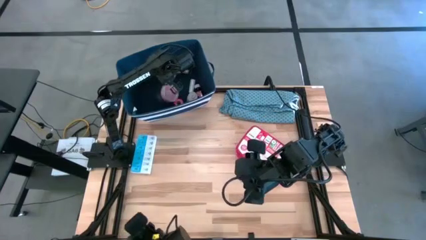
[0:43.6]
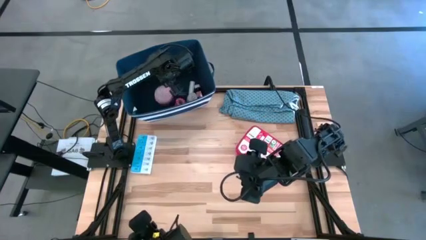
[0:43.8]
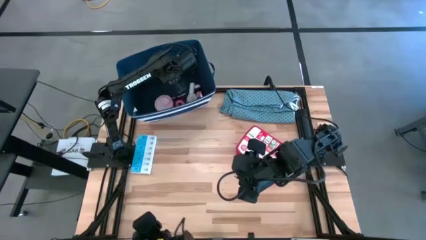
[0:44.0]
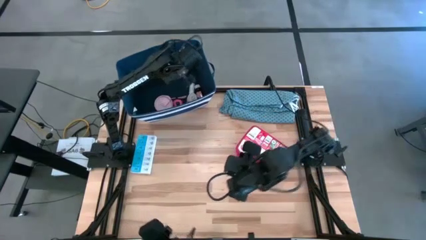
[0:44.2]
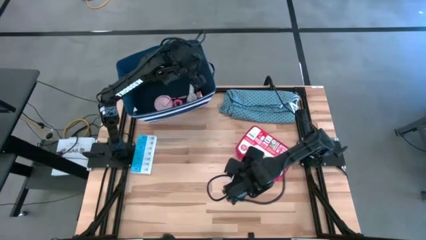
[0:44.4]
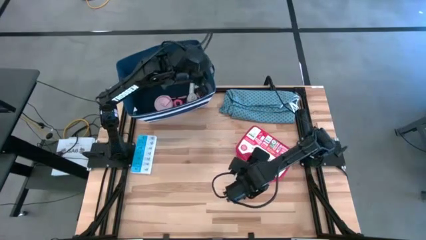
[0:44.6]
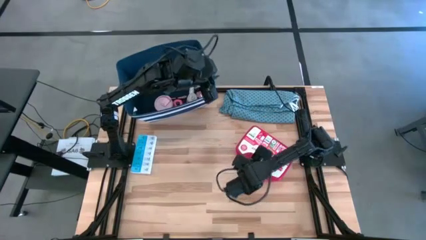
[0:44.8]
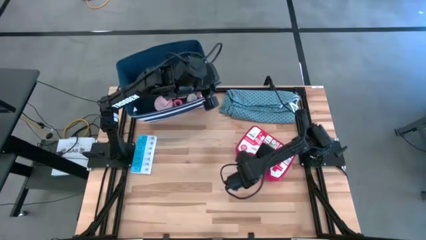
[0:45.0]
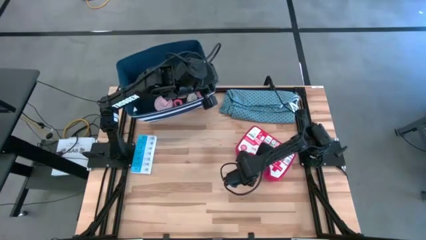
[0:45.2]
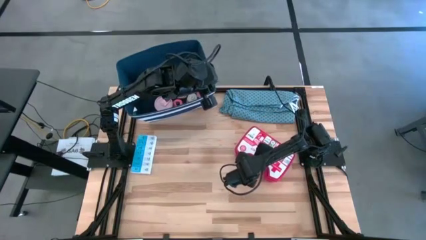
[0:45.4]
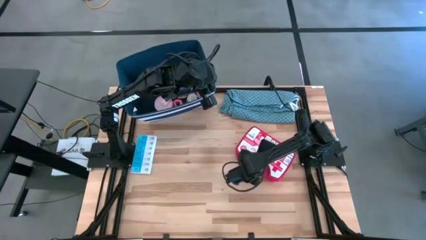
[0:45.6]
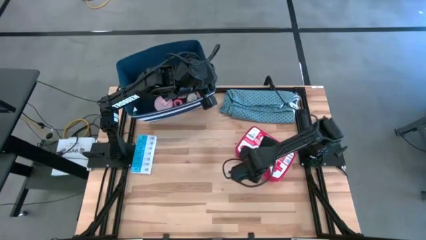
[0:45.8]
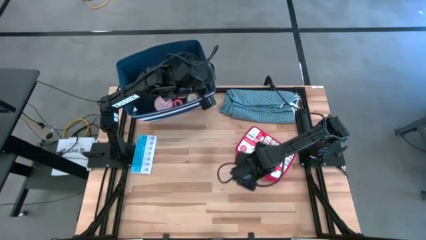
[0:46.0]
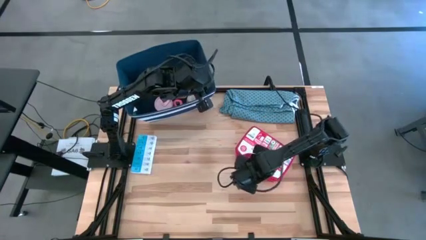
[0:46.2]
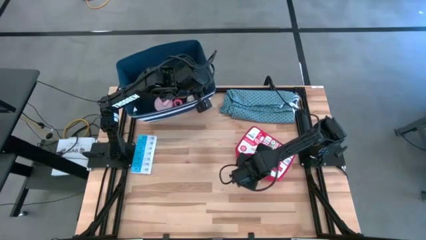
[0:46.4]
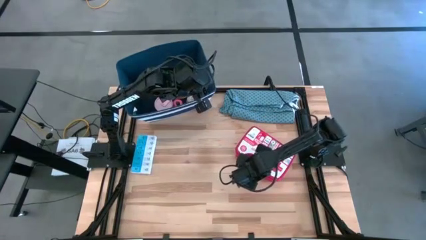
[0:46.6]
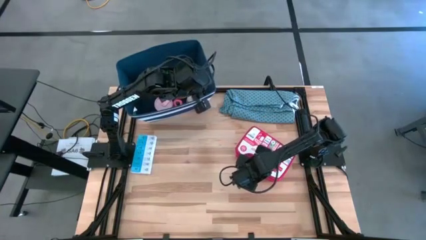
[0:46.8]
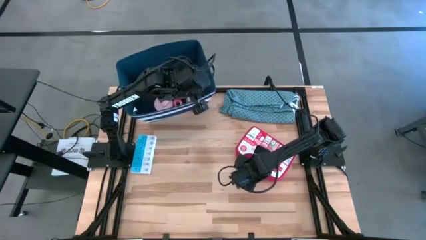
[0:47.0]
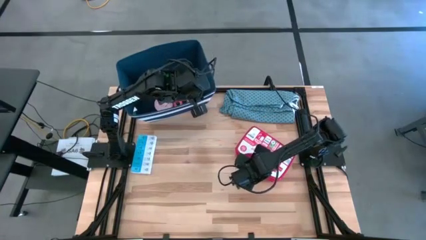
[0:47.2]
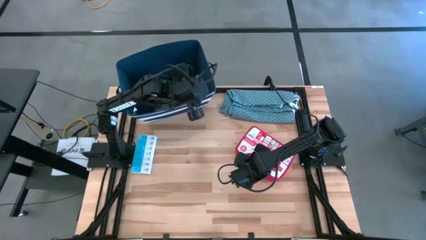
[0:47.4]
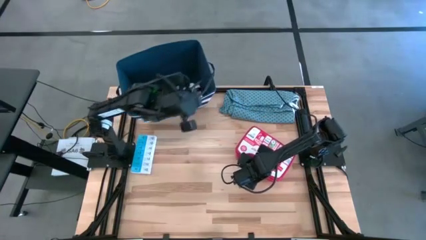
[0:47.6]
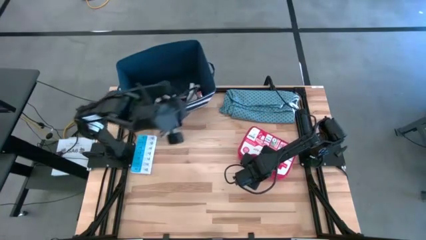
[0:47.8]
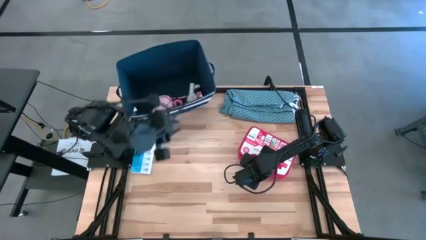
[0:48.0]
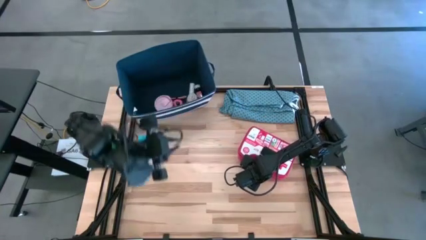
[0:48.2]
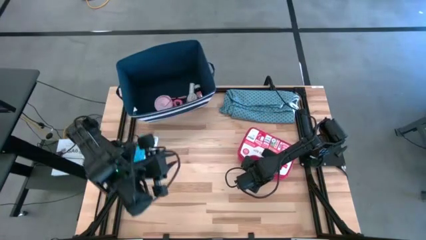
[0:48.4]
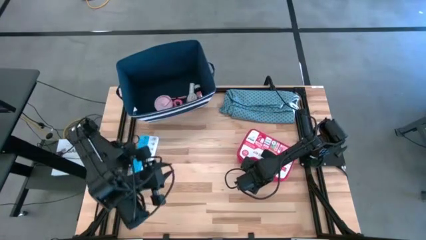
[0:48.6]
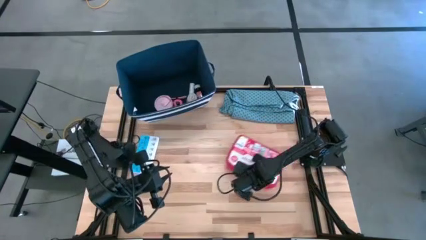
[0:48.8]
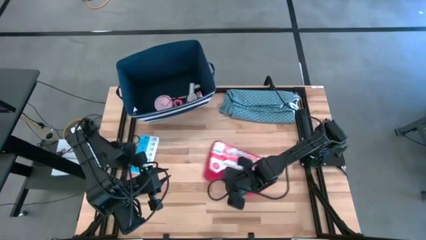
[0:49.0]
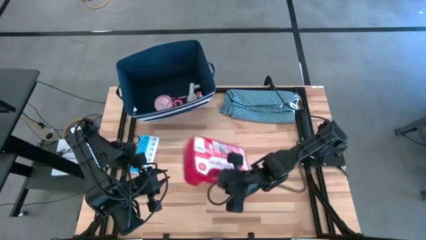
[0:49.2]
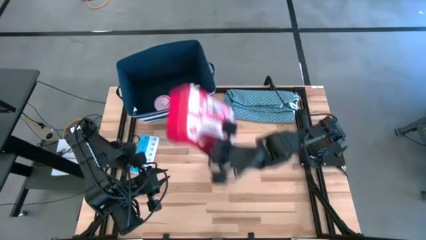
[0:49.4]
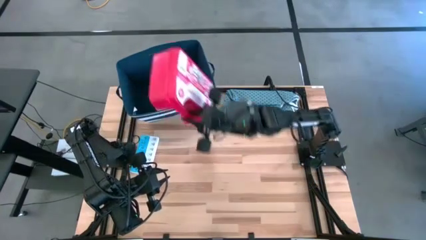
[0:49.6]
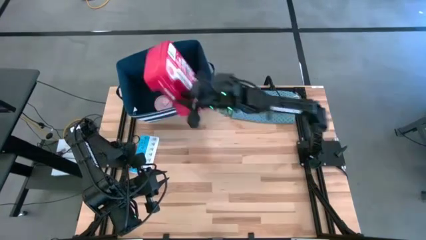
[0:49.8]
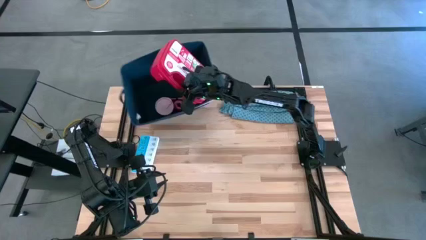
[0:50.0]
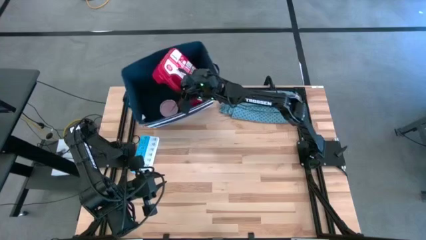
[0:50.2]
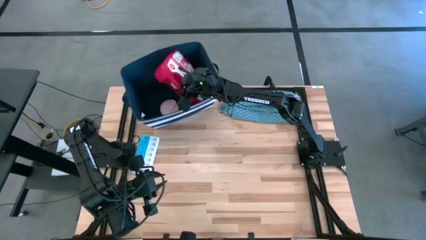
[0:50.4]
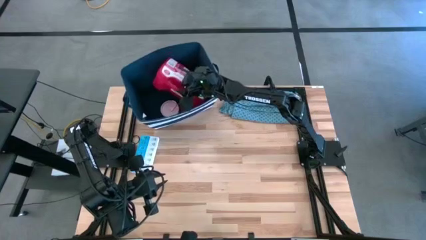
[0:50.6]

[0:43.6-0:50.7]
Task: Pick & place medical supplies in basket/bin
Put the red first aid kit into the blue bin

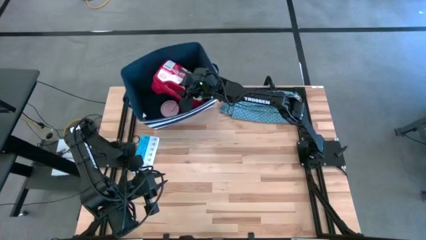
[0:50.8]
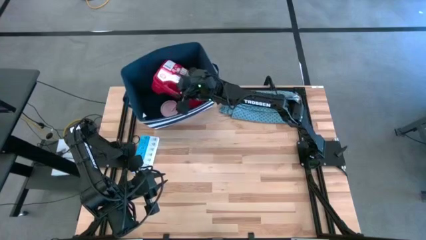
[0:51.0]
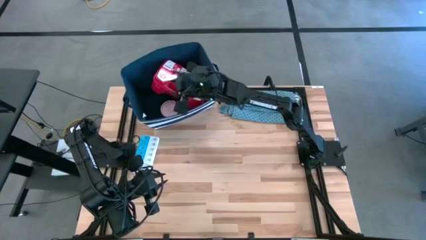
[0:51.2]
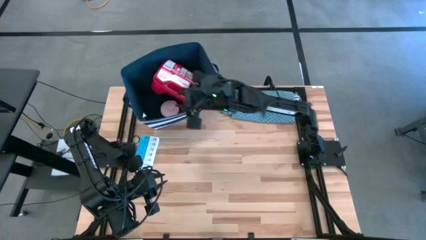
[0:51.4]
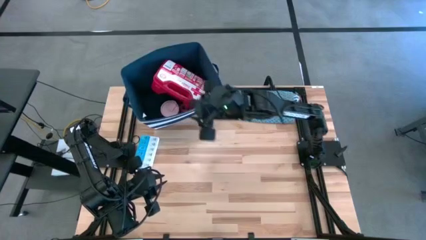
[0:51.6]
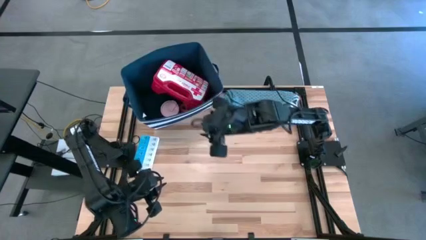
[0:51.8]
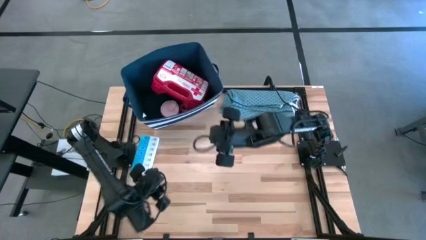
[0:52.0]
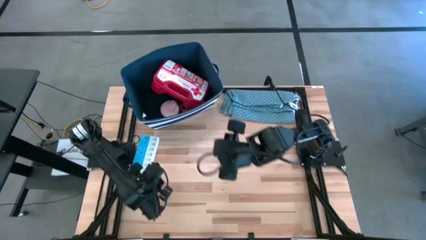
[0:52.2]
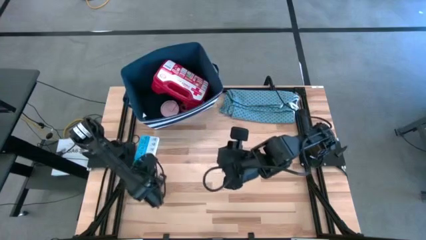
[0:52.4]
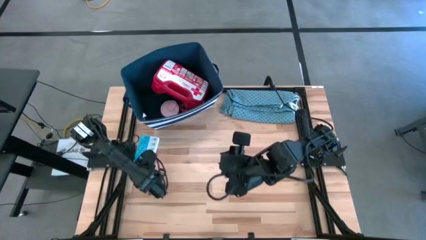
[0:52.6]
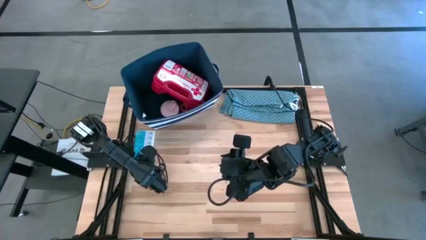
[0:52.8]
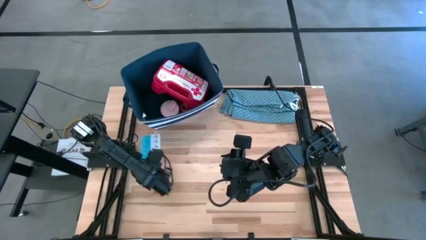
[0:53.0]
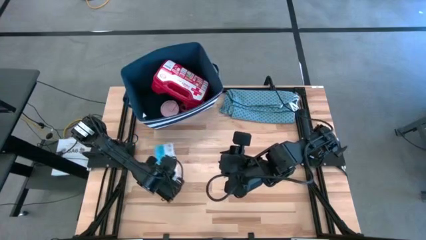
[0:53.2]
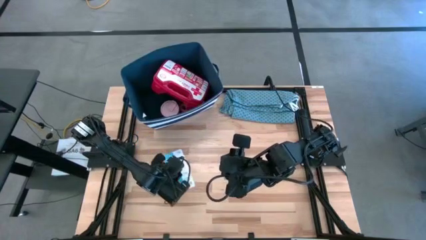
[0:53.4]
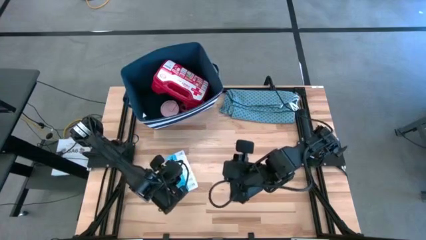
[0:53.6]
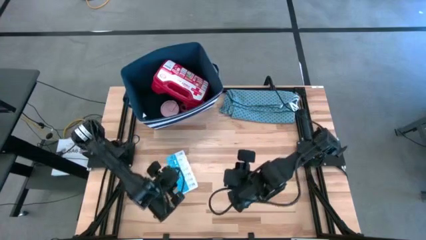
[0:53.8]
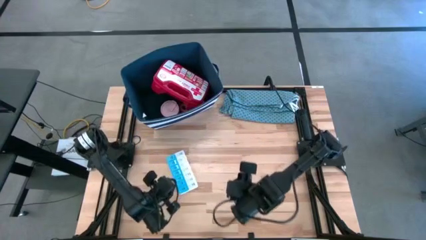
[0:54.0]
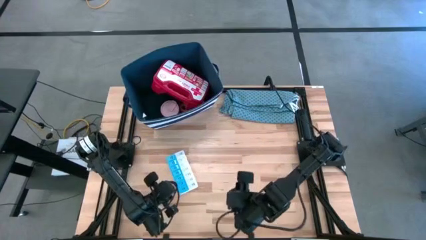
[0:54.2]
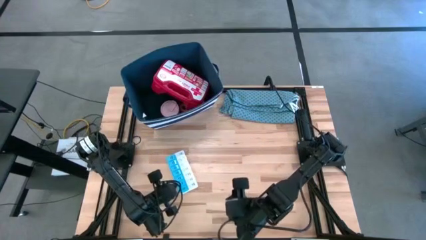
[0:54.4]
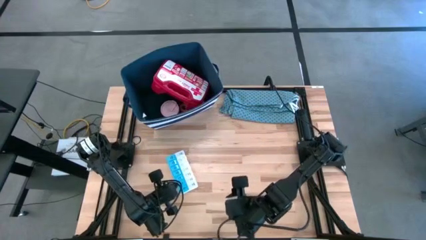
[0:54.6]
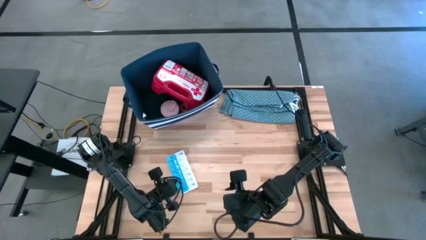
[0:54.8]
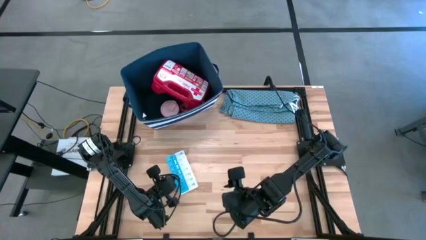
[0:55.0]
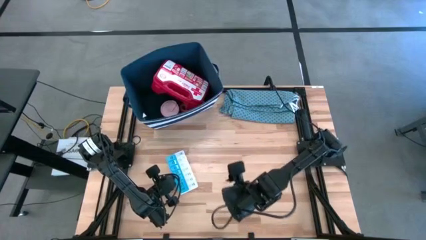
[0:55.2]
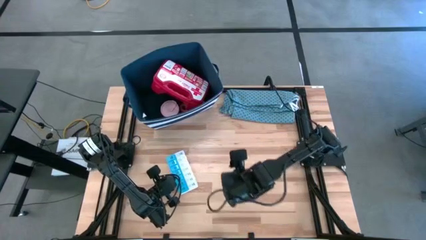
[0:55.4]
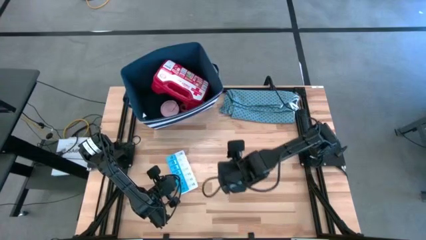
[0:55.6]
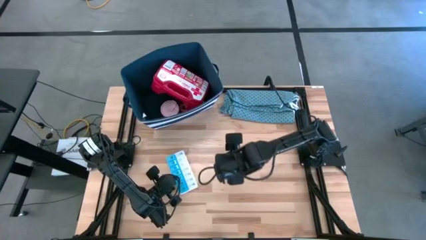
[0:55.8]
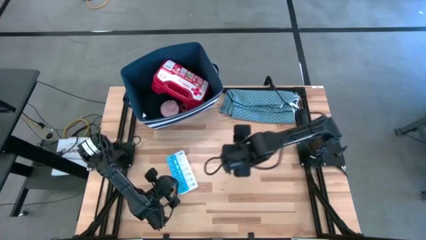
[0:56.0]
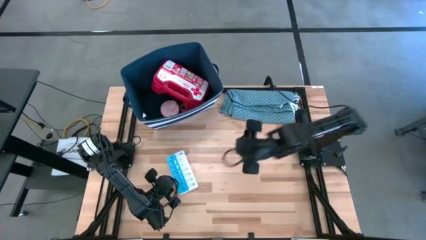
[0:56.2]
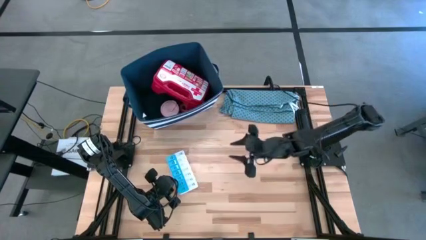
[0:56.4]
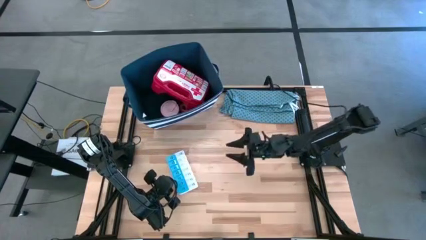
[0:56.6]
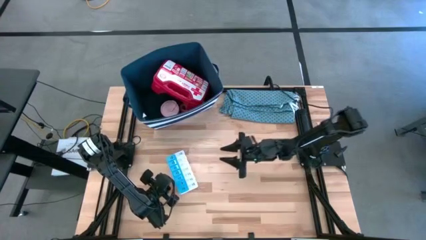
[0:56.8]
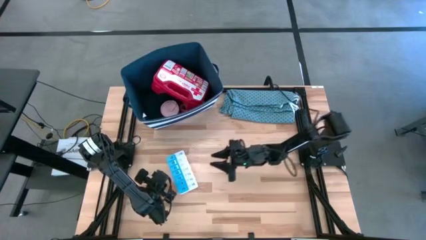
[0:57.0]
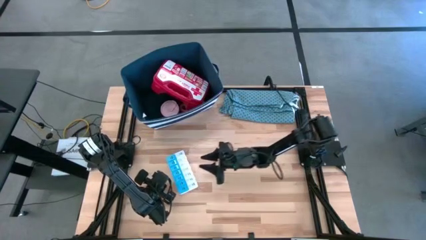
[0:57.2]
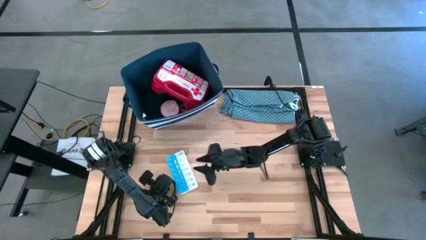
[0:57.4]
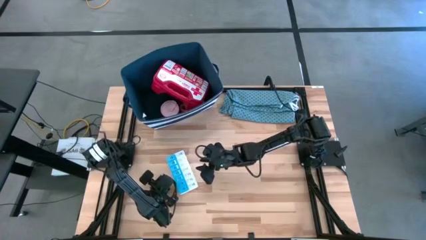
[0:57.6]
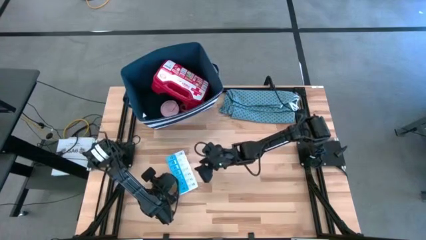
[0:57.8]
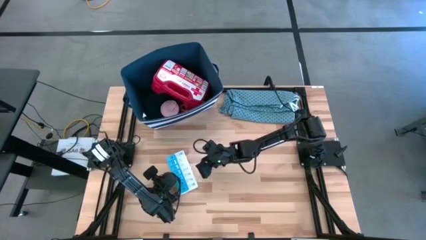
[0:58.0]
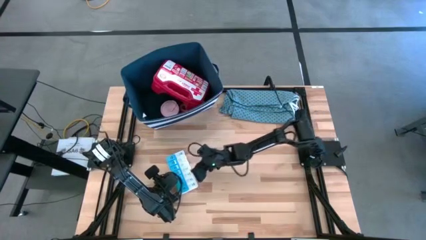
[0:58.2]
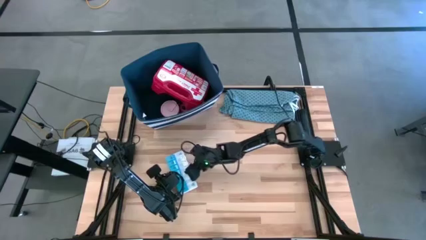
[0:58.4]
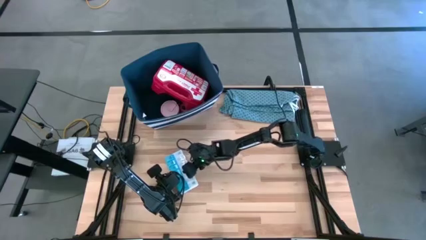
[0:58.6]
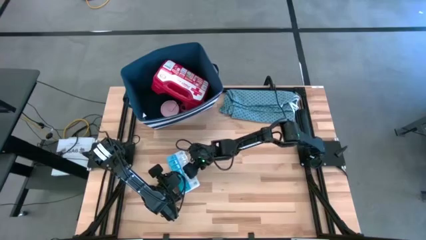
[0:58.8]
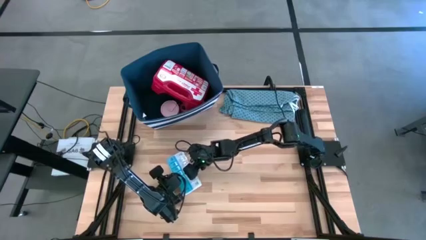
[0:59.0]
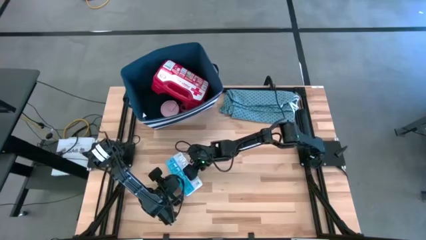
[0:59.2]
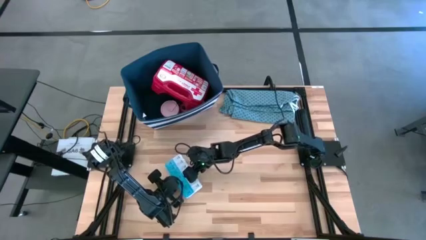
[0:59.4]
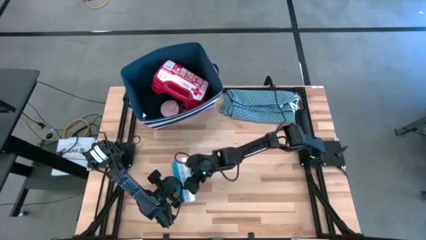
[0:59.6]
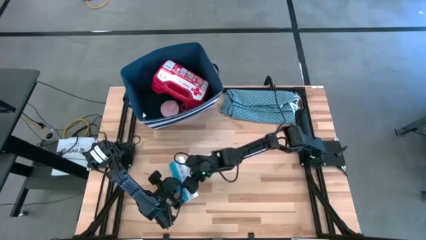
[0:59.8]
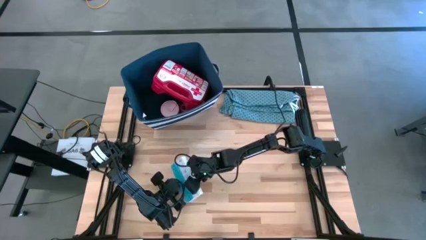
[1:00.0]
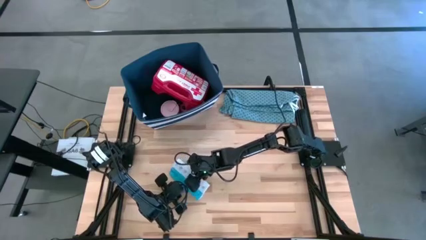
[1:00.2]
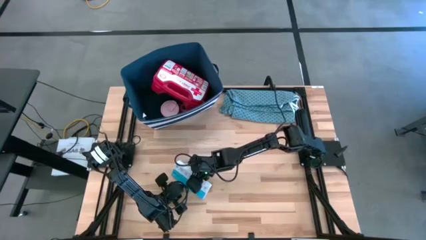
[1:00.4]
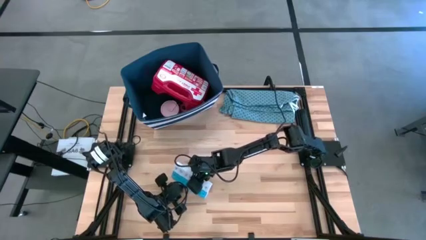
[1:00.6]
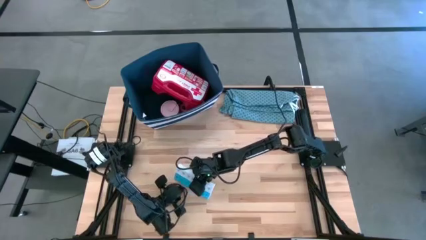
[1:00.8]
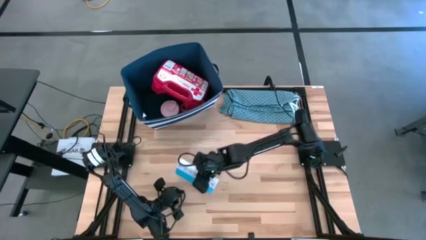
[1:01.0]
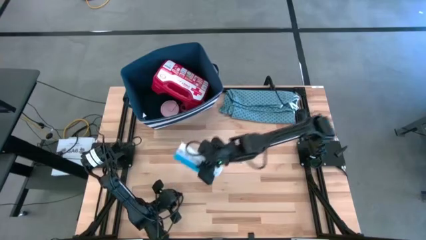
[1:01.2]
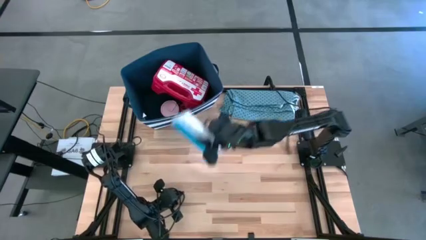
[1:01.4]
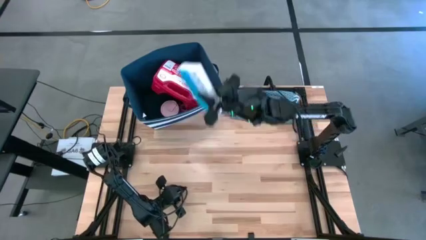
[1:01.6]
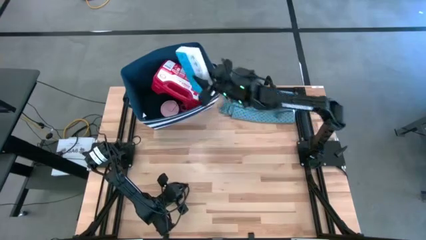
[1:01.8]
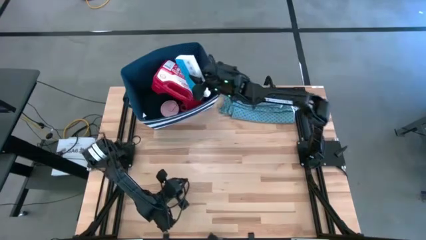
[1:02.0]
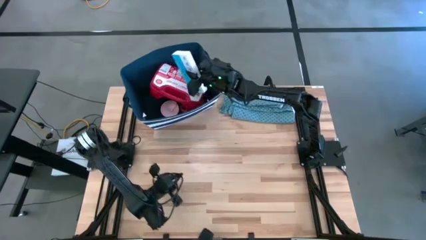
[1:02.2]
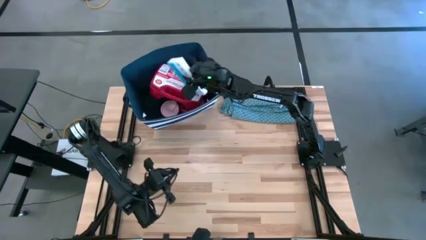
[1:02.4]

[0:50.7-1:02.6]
Put the pill organizer box into the blue bin
